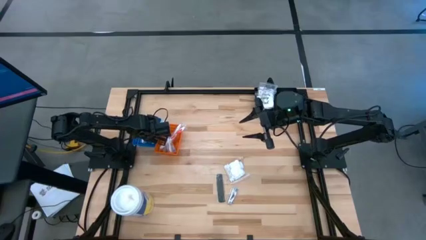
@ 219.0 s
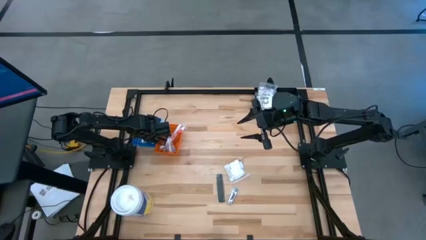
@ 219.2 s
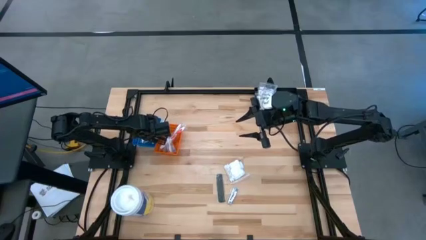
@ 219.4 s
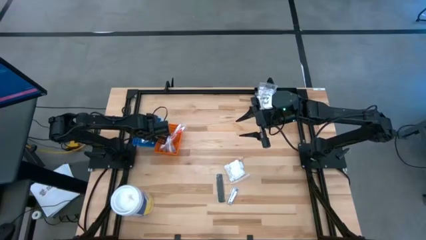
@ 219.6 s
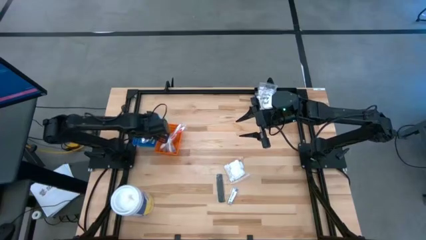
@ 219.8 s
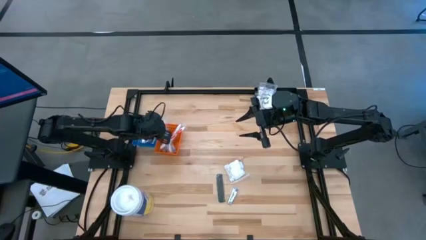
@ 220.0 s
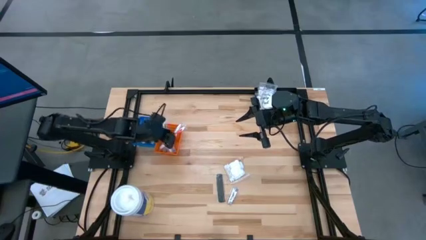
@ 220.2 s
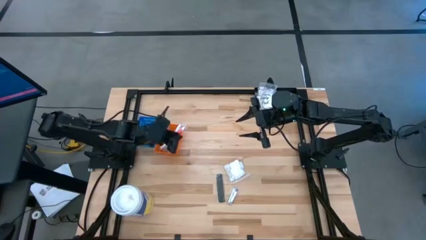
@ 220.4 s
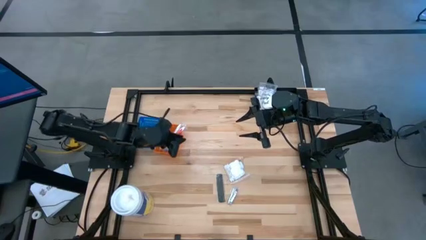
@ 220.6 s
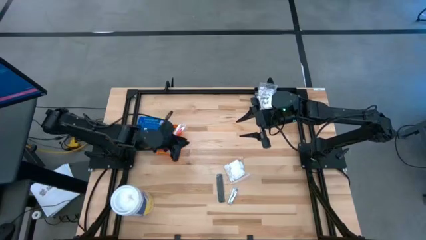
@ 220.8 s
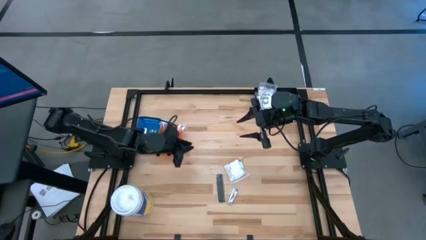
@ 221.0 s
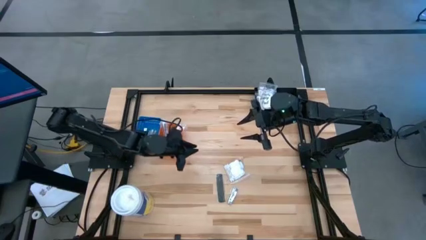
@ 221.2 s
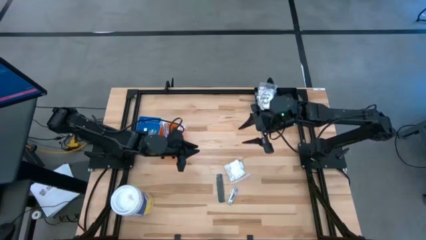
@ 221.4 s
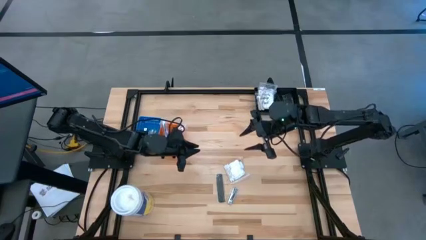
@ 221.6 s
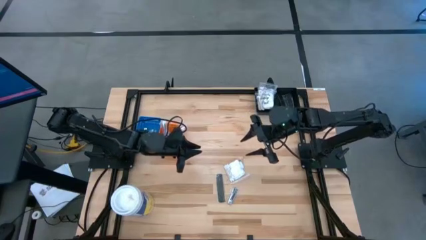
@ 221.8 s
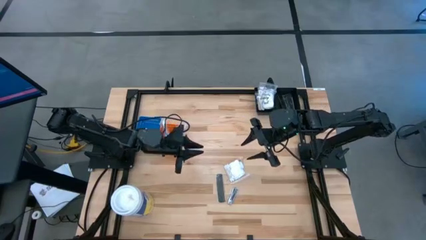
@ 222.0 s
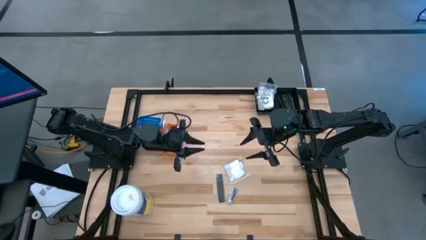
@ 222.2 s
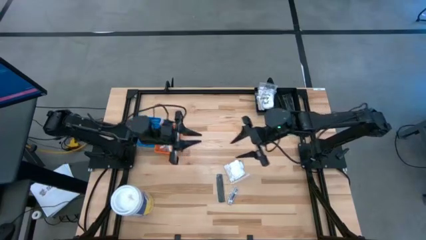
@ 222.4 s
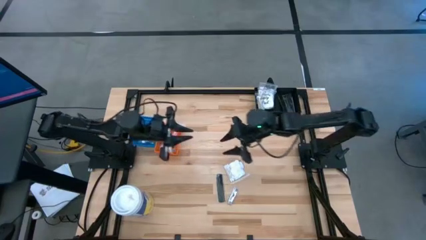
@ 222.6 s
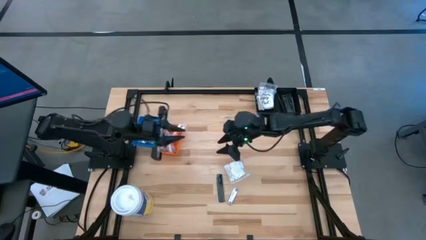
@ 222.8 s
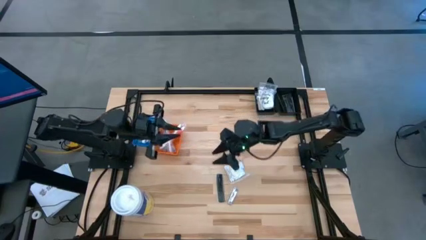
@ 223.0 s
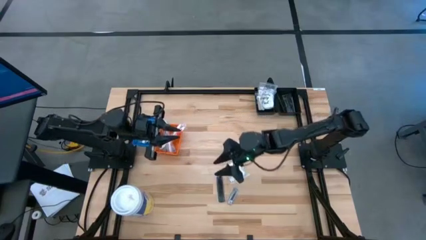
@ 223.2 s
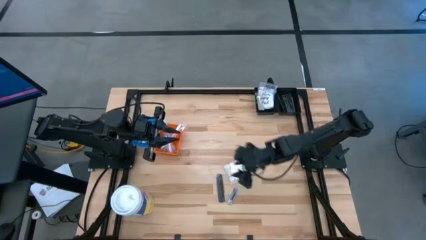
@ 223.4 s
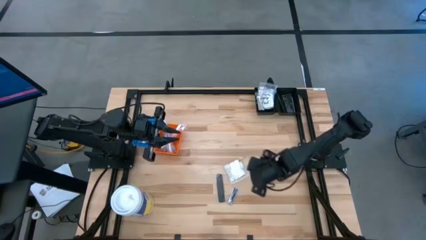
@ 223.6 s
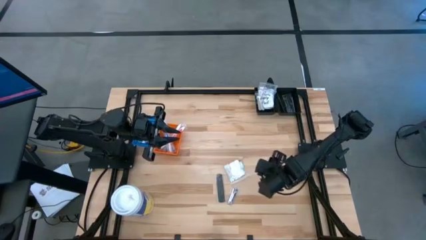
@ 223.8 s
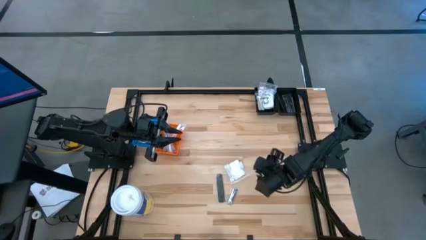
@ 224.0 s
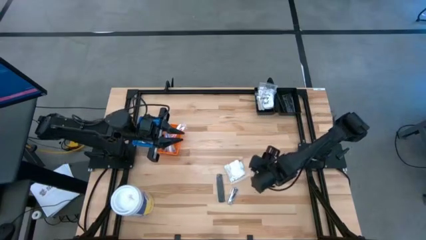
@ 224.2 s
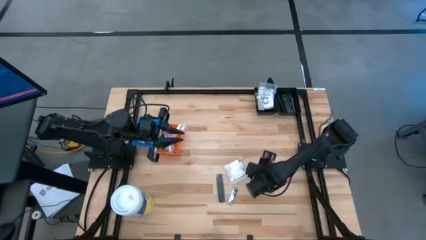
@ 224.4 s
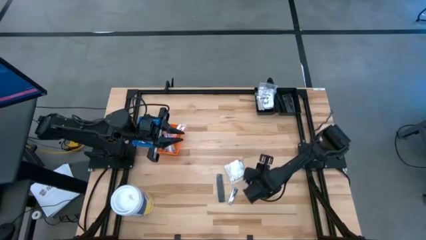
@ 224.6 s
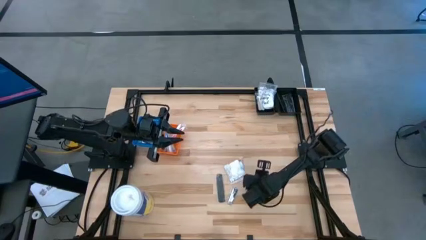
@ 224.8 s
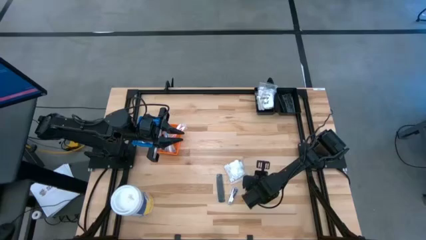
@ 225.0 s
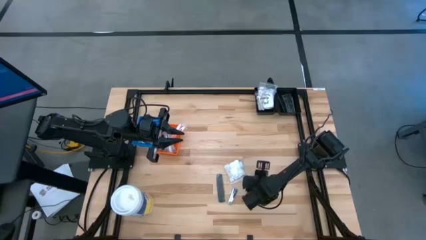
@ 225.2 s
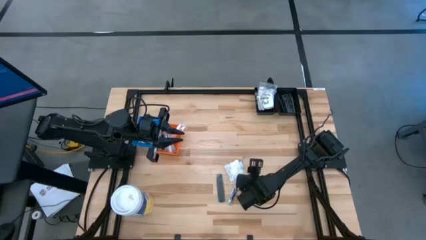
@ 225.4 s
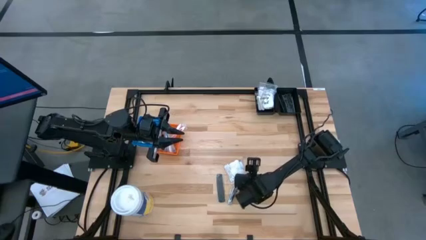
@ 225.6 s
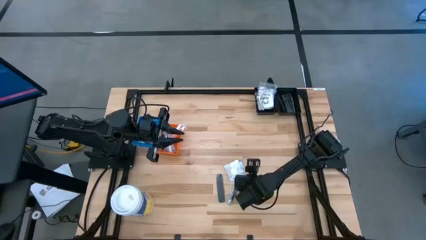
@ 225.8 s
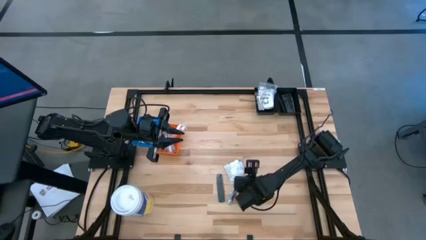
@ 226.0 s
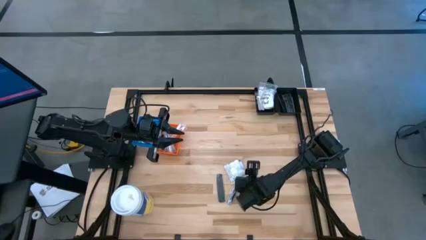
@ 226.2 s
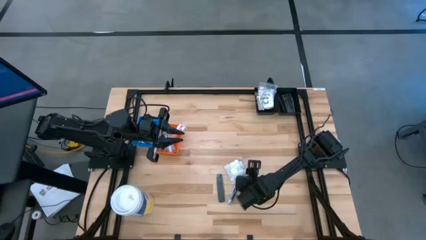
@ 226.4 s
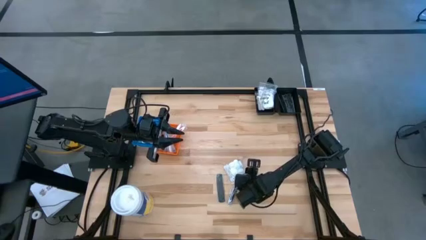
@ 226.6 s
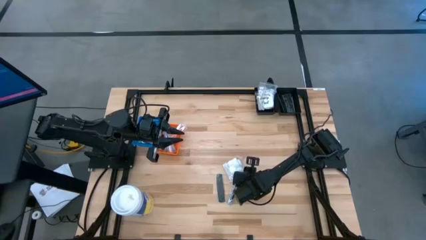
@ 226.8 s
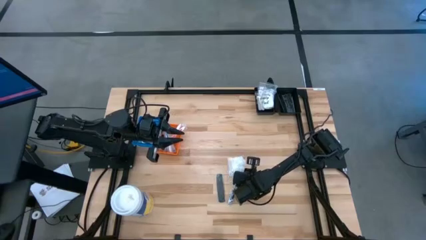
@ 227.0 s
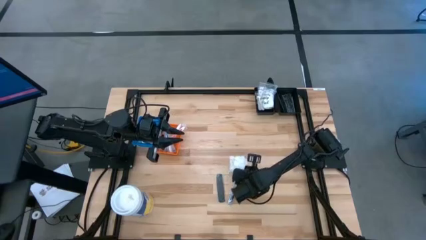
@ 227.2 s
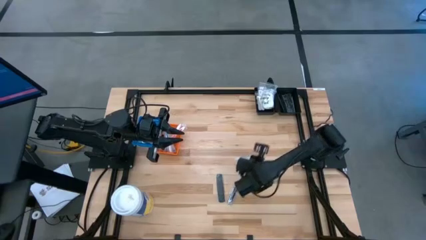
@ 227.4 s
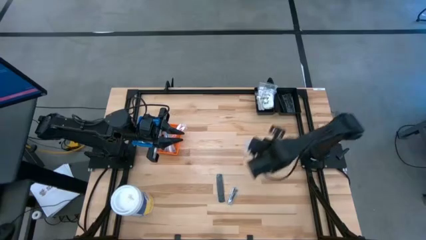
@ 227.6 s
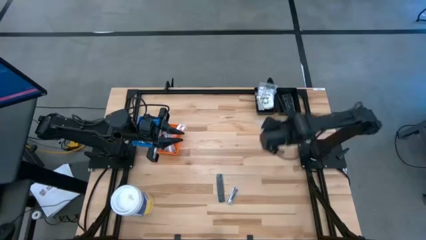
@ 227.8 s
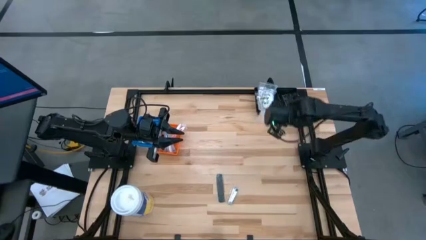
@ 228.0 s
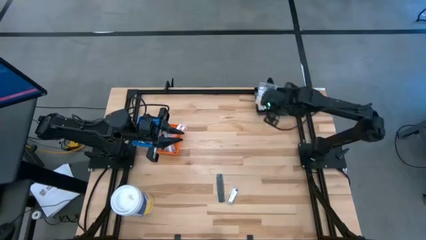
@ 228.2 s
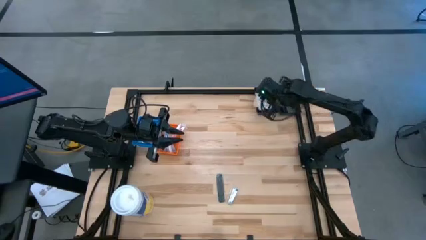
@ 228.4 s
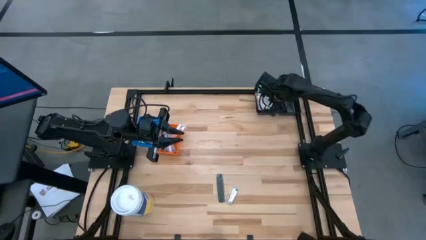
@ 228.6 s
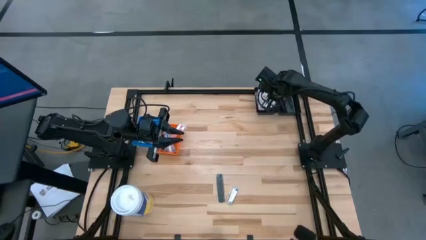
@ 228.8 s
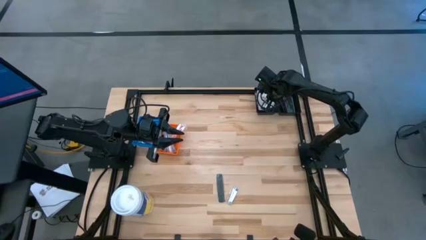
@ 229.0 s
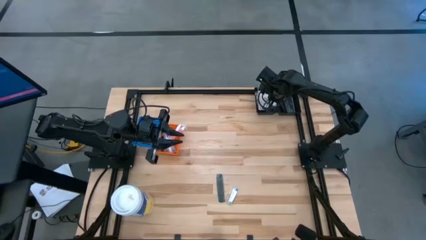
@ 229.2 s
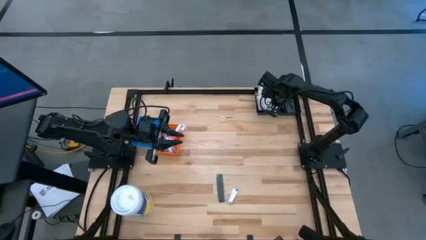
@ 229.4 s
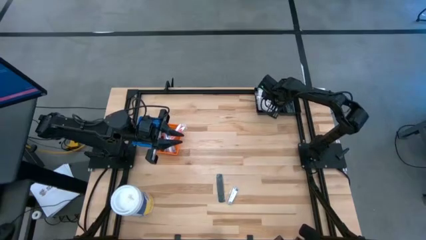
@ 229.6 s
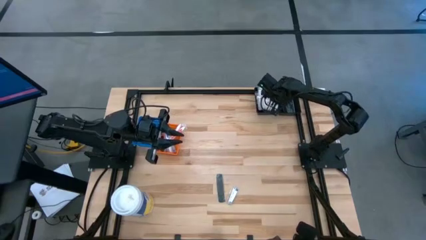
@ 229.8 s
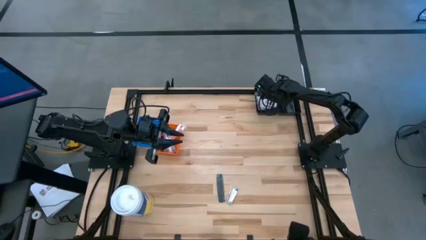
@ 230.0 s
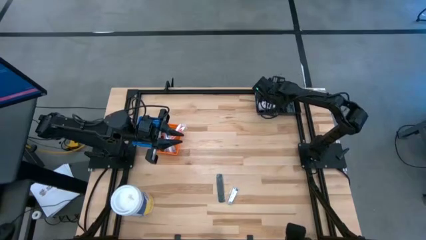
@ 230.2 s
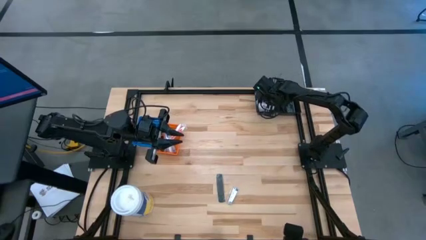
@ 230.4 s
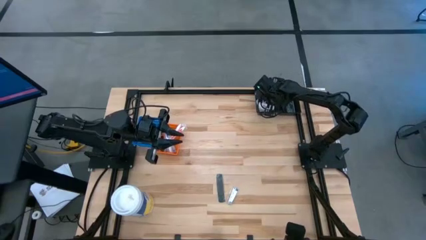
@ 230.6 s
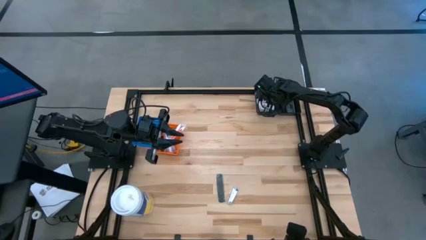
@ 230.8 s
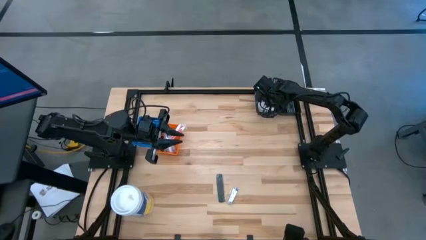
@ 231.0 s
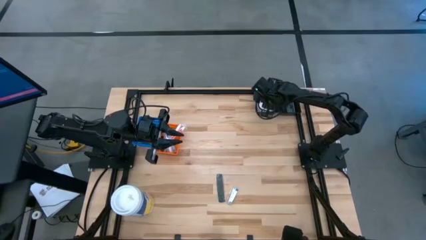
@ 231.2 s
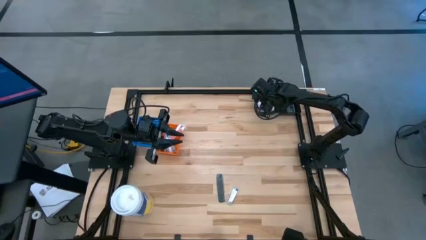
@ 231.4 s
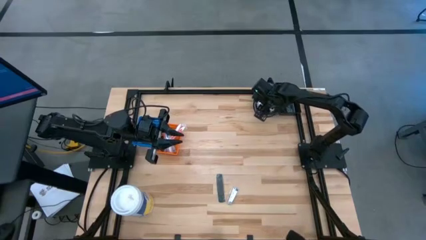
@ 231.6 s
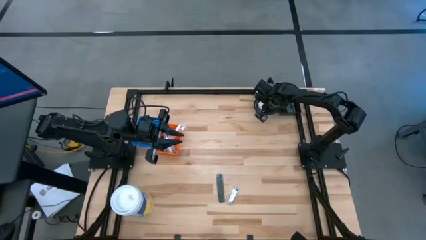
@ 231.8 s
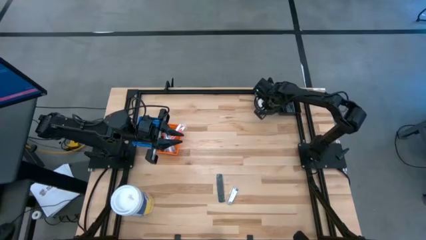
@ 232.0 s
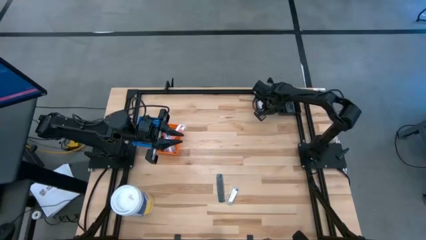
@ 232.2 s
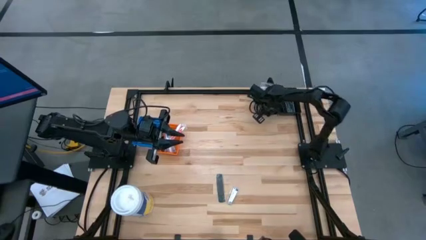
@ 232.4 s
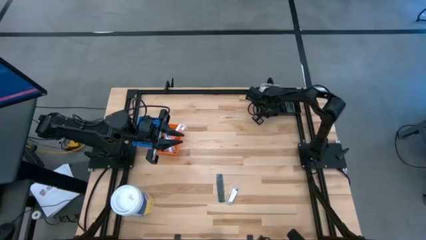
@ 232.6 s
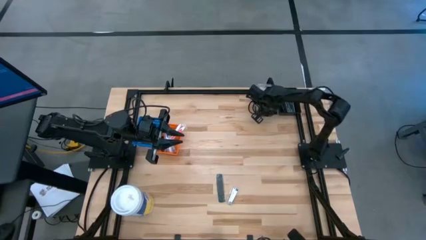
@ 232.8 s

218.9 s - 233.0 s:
Task: Pick & Place Travel size toiletries
Put the cotton pack into the left black bin

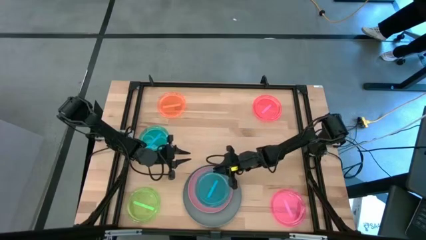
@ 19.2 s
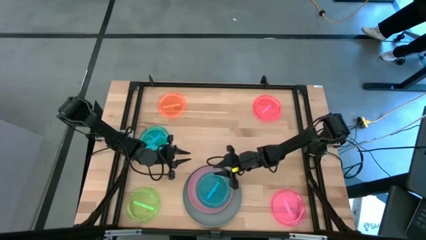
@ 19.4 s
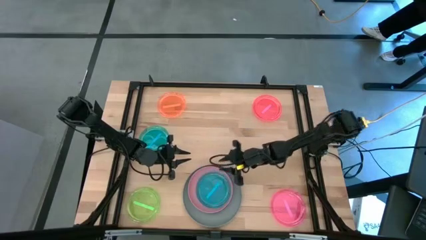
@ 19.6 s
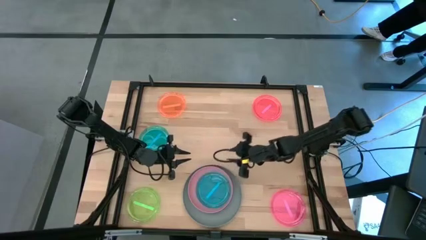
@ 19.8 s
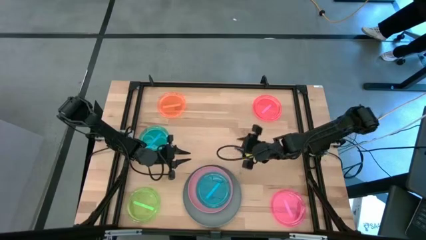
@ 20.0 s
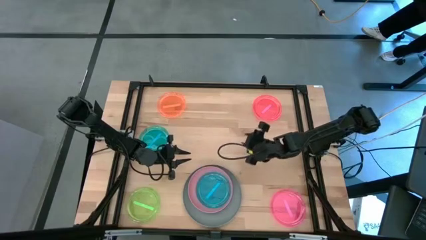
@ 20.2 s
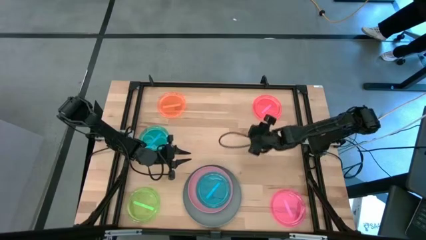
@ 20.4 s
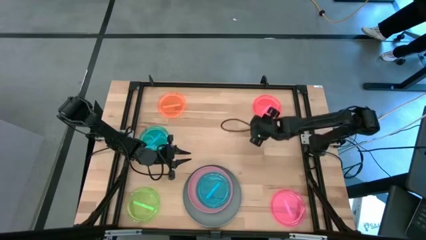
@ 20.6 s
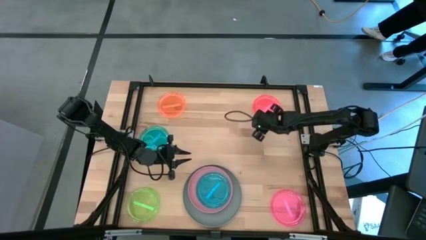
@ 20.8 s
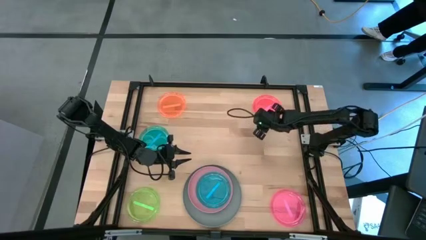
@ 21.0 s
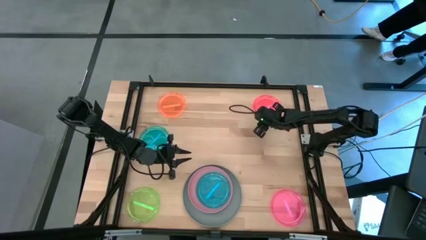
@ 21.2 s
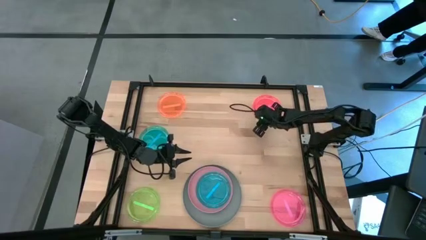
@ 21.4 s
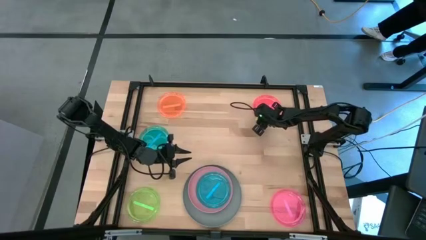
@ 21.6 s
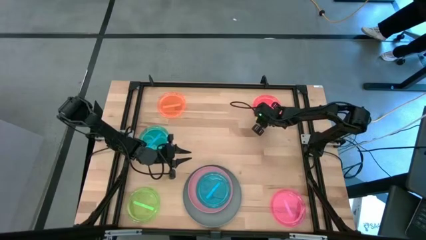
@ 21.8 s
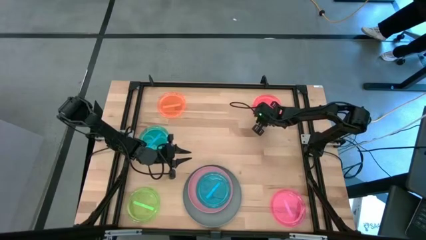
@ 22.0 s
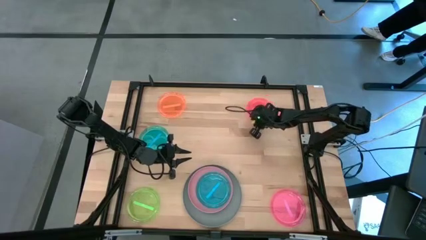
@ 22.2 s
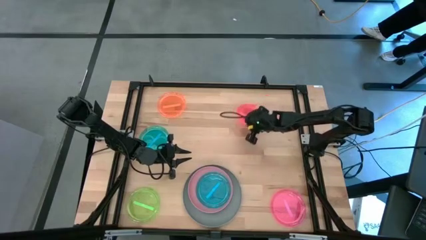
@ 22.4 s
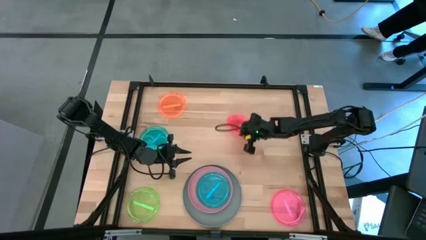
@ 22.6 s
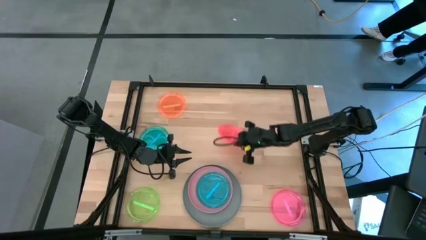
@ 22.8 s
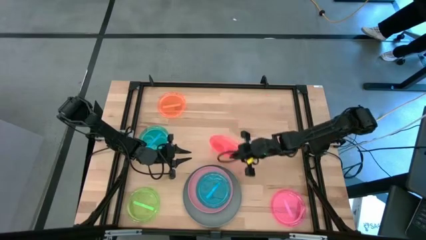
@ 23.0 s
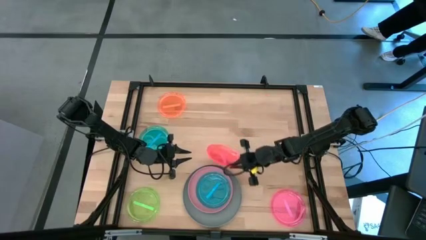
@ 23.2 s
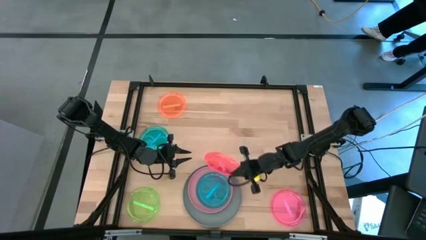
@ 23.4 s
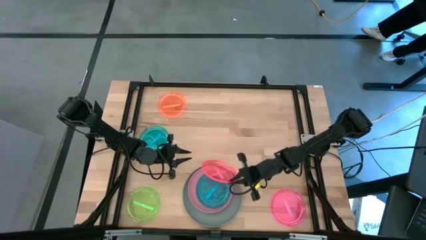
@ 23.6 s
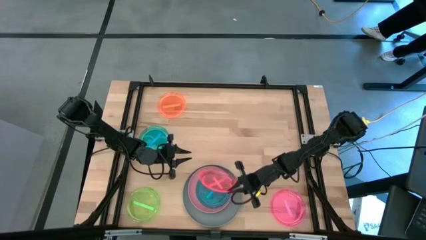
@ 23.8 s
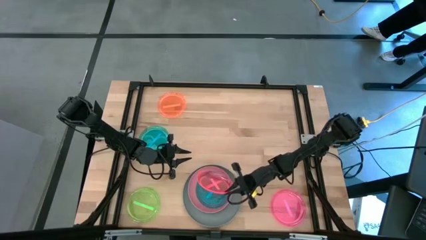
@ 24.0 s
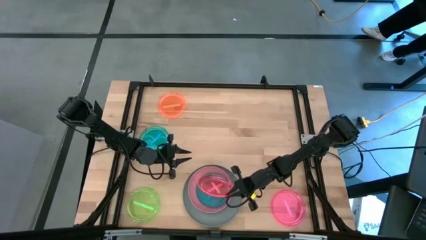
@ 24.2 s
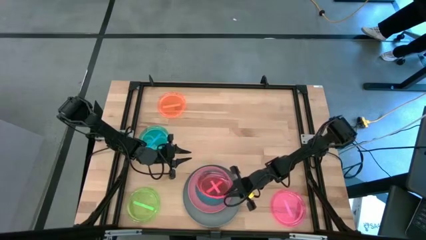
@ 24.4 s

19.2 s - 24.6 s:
Task: Stack plastic plates
Stack the top orange plate on top of blue plate
